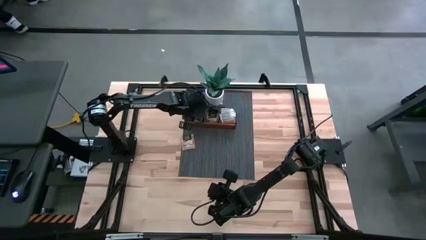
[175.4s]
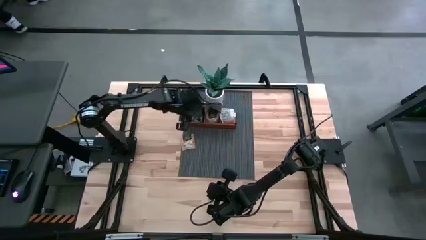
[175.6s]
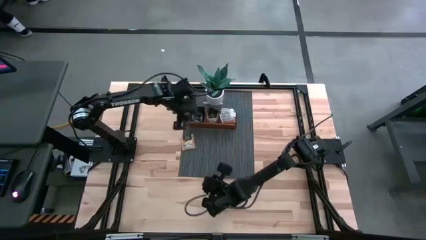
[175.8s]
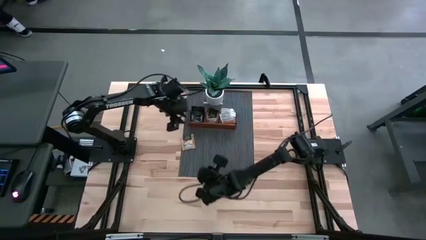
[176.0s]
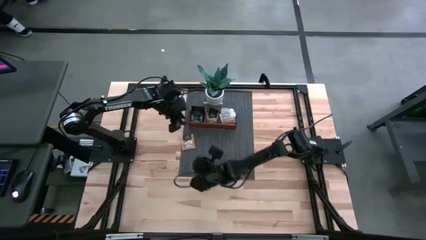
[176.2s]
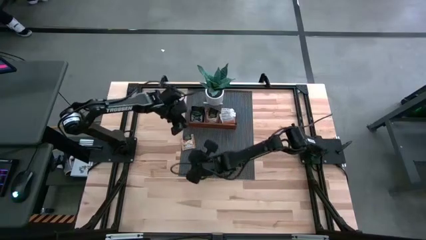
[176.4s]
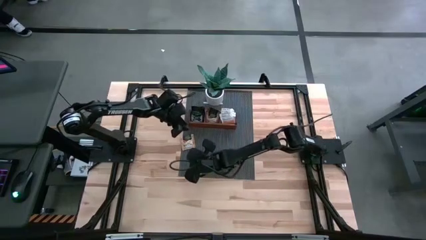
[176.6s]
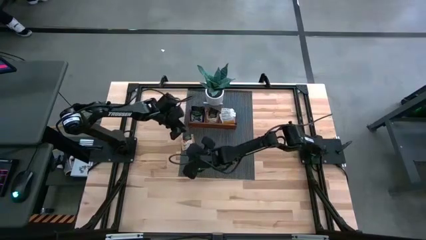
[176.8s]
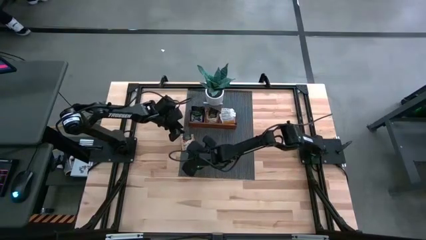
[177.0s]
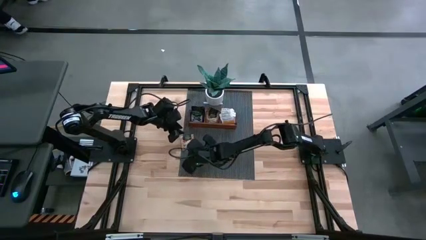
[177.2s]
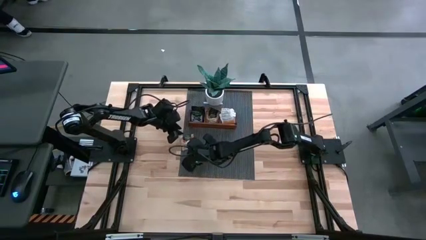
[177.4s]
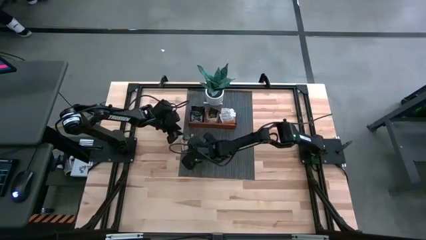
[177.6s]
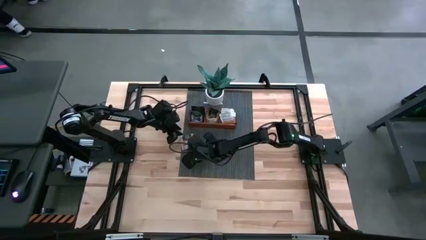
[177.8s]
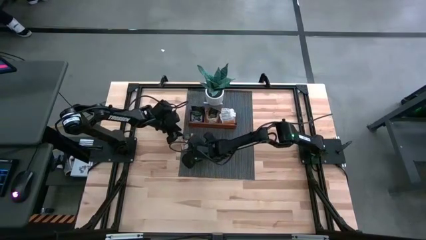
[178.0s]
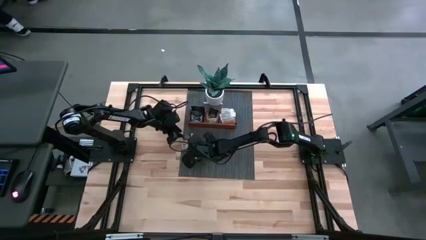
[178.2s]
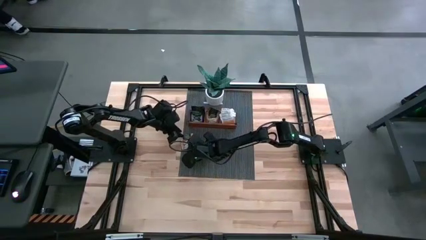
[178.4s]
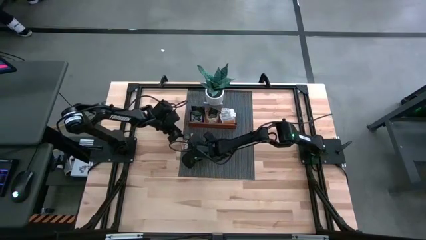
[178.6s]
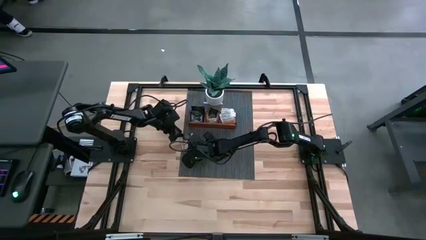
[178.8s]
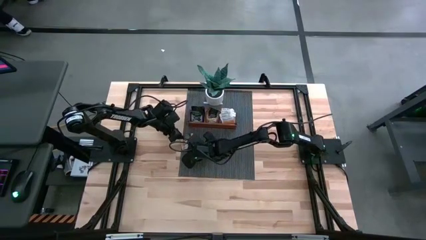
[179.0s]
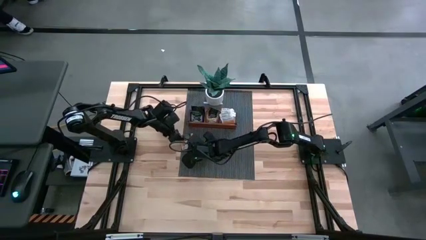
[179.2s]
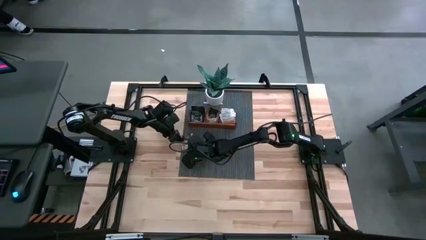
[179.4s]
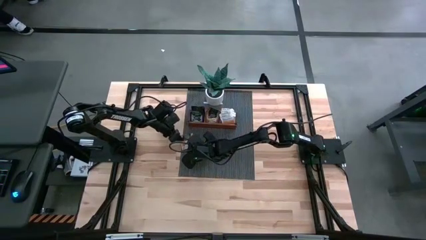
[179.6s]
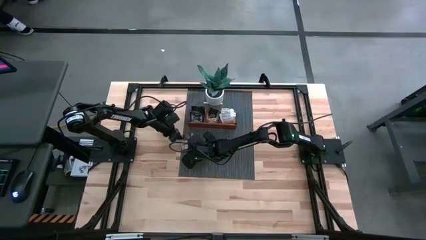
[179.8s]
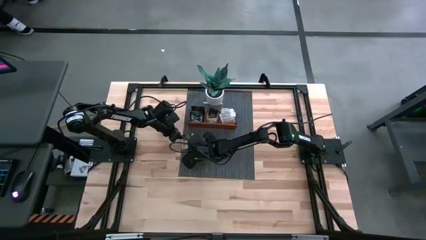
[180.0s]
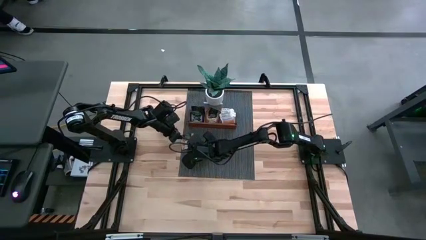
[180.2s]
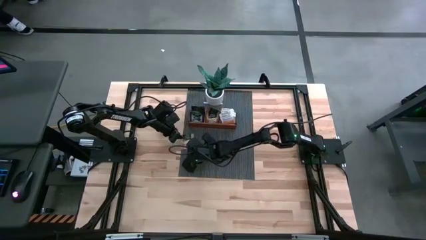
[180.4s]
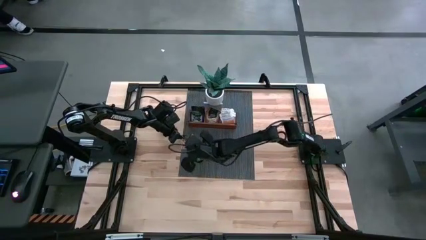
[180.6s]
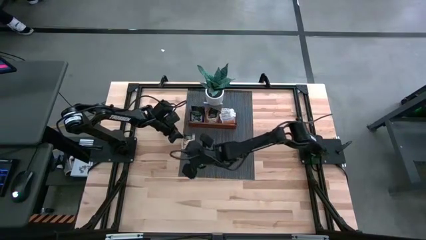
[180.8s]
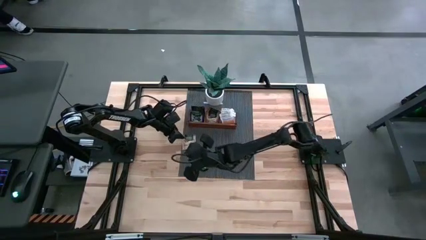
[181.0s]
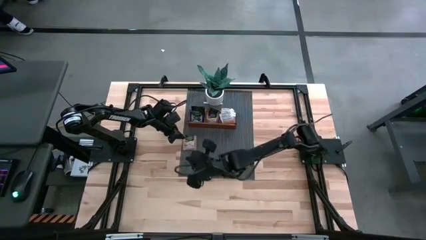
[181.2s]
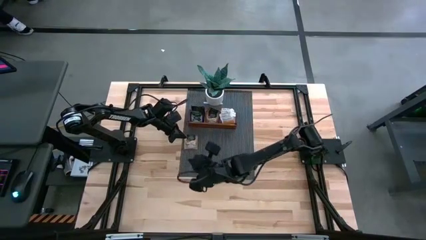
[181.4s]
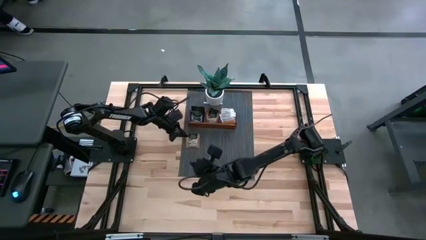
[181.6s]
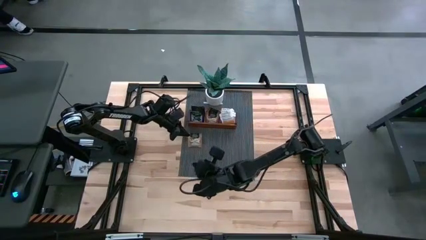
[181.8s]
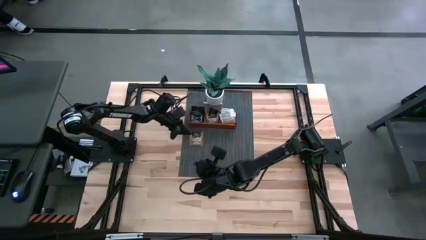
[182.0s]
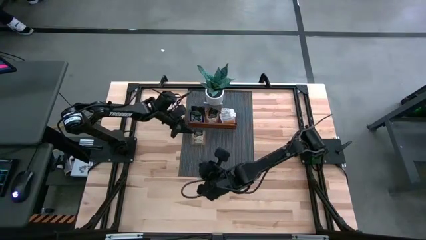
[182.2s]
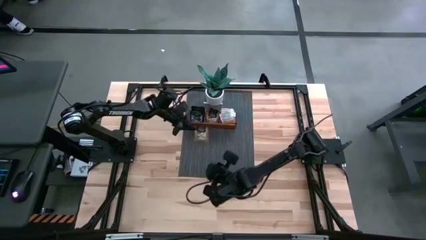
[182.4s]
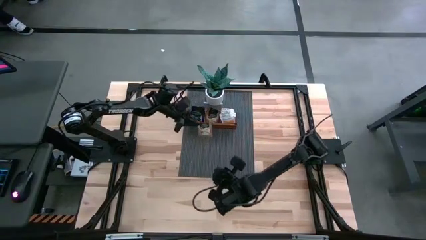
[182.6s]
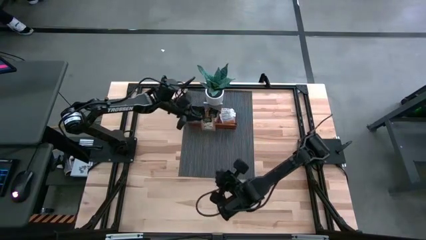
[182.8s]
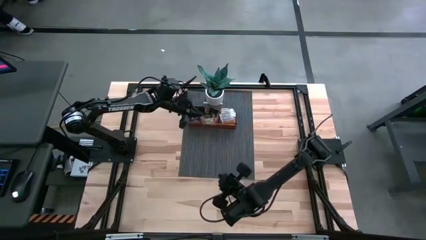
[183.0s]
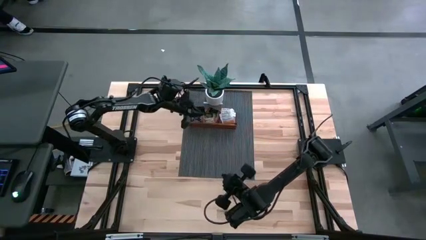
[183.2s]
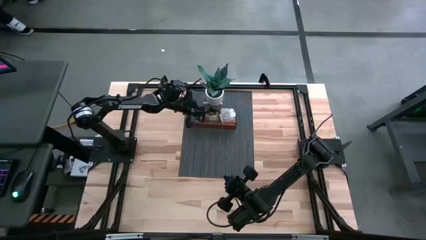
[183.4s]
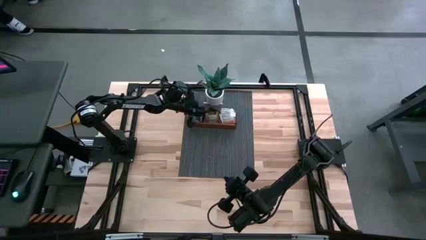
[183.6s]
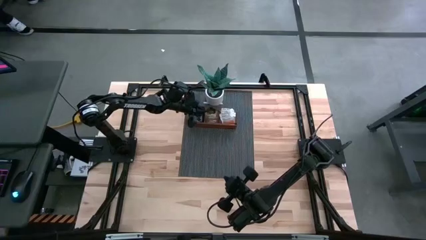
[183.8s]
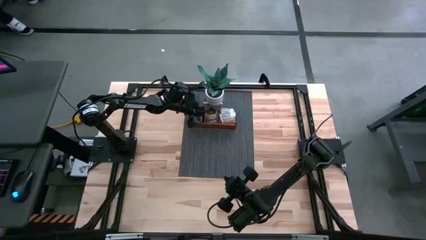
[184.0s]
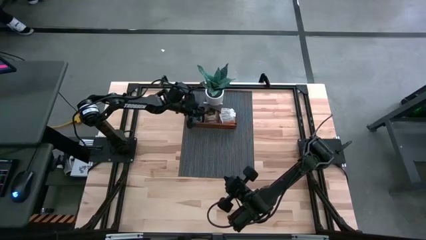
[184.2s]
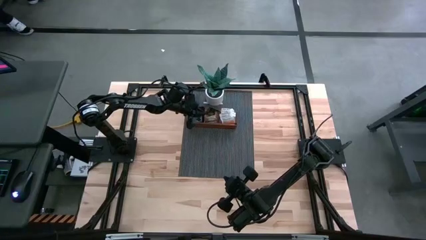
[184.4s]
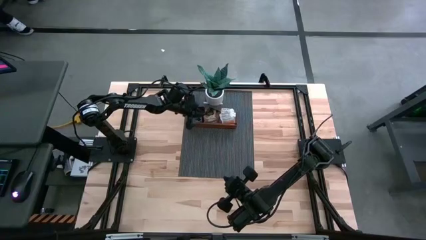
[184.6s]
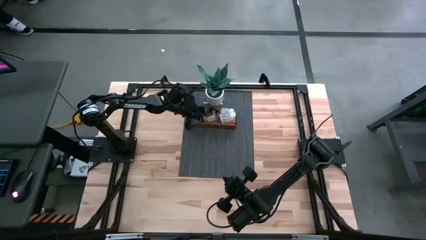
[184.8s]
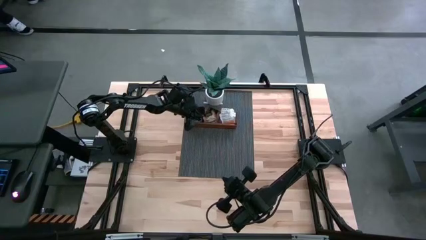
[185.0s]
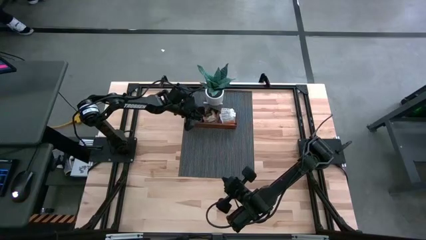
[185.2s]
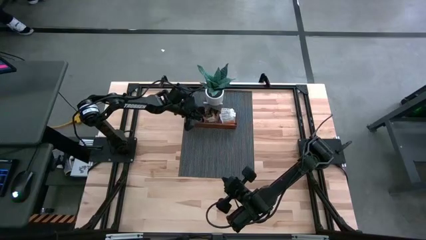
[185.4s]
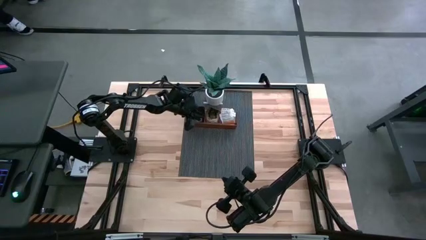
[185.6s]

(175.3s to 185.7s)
Task: Pick & Place Tea
Put the brown tea bag into the middle section of the wooden organizer

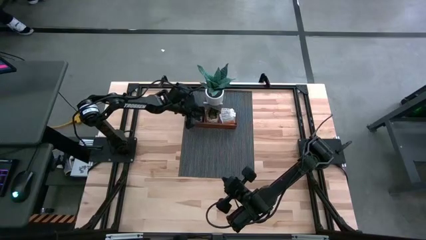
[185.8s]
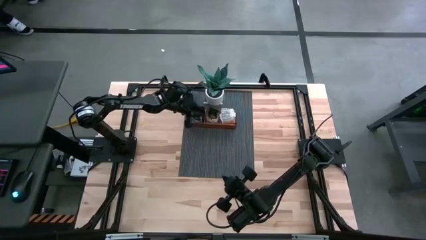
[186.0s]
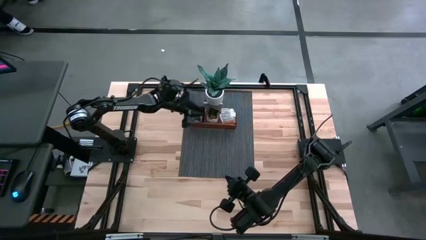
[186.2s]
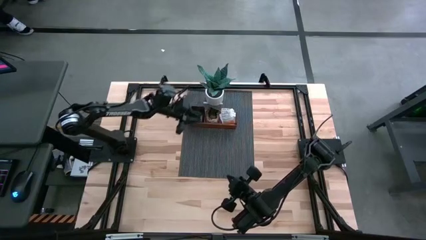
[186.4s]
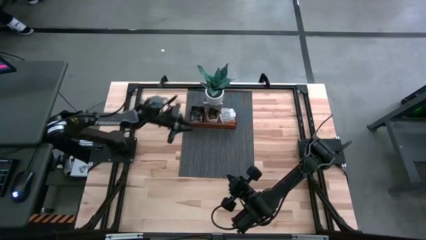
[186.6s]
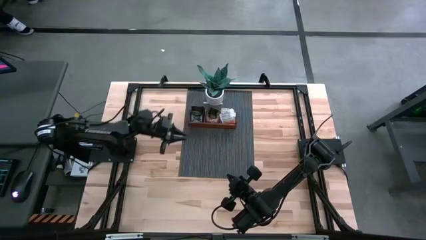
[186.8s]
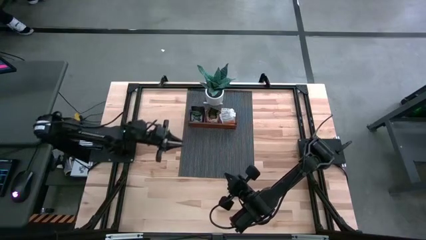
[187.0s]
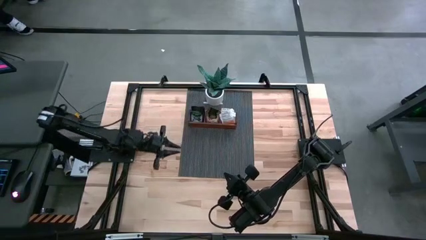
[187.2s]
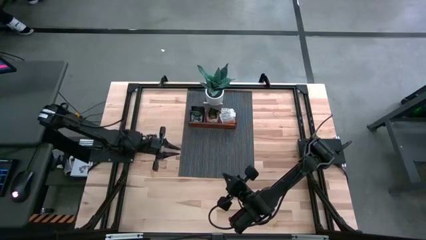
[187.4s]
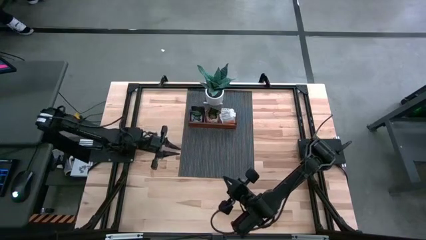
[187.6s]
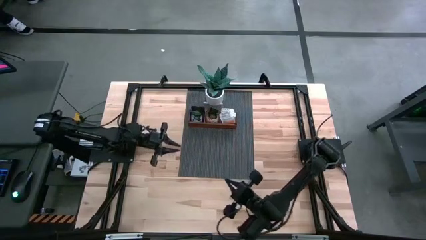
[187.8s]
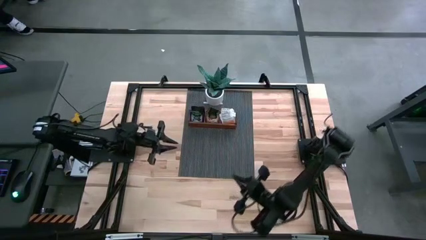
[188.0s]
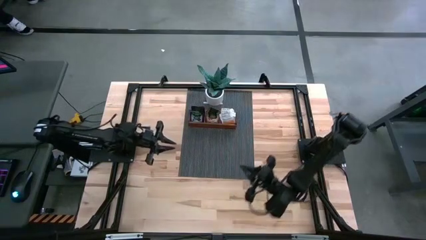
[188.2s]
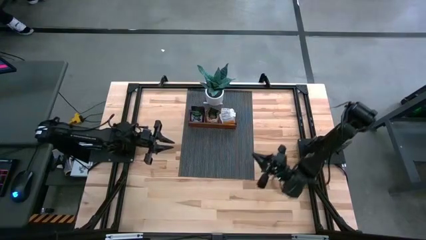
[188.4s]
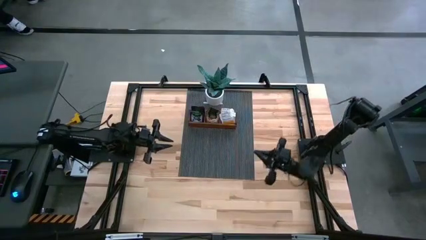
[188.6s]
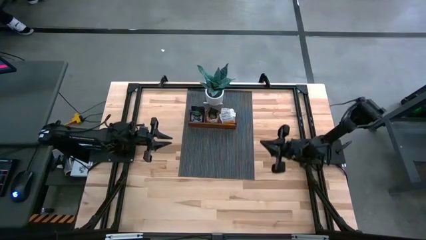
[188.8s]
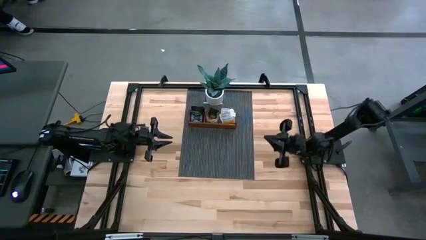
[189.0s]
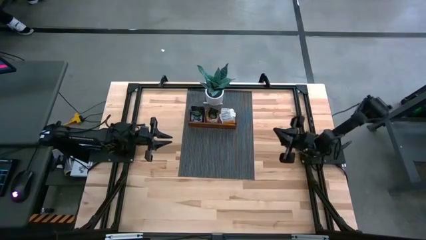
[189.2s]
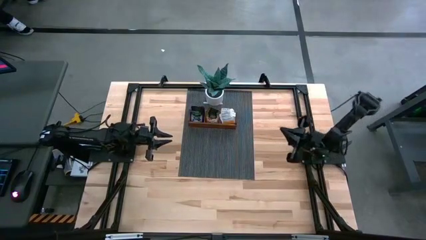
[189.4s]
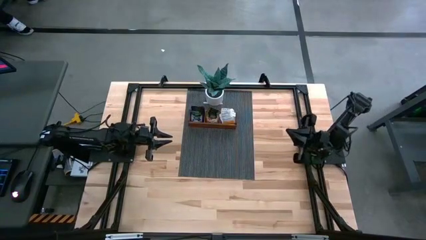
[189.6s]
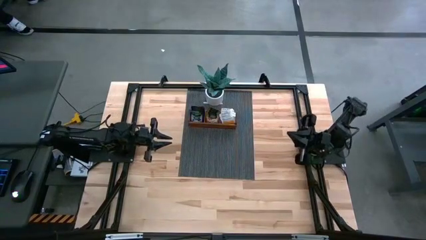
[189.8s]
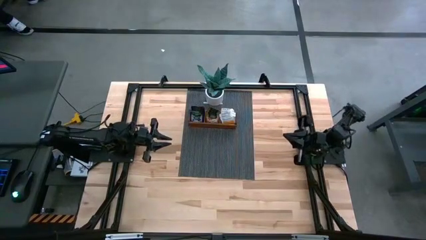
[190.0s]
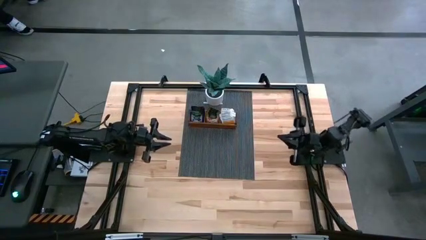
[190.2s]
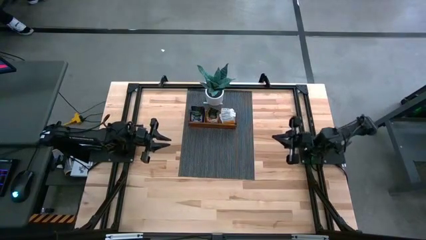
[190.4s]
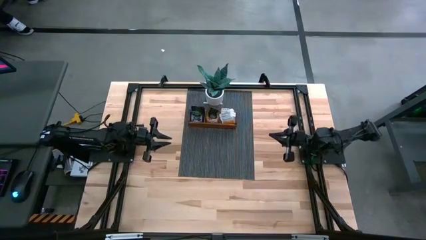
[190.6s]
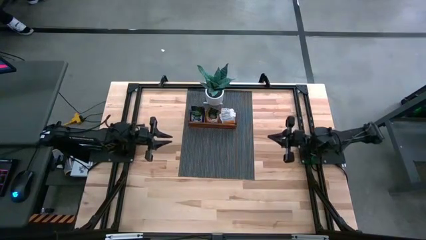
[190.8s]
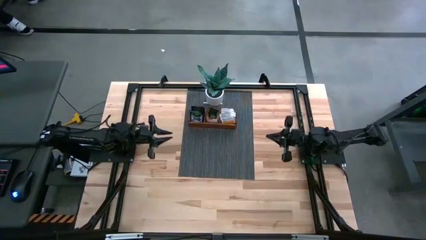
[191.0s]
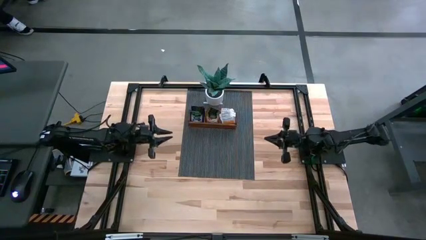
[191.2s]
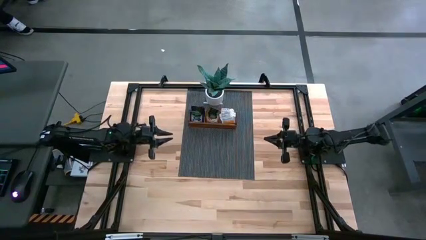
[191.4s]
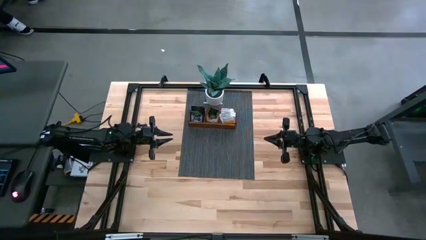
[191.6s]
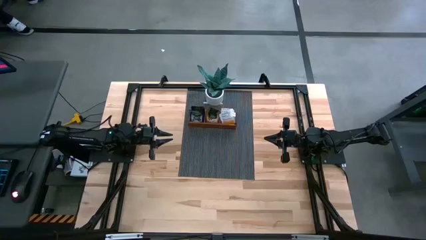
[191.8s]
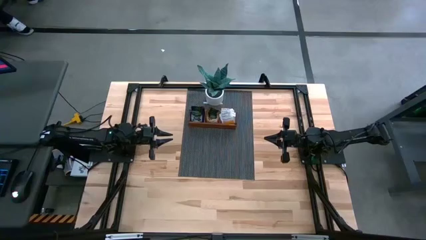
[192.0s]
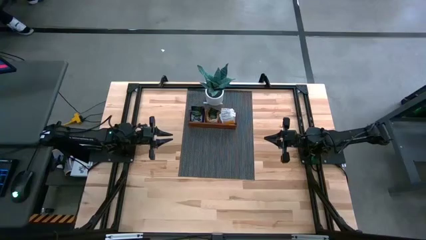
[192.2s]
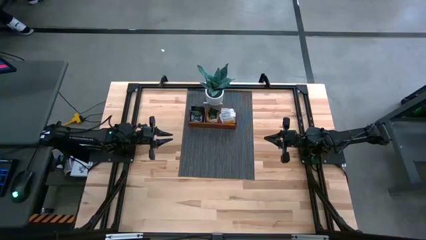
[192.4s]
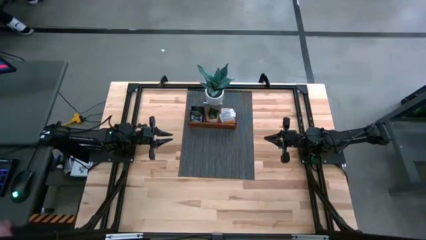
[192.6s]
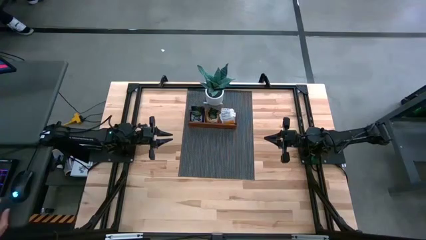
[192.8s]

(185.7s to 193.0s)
Return to Home Position
